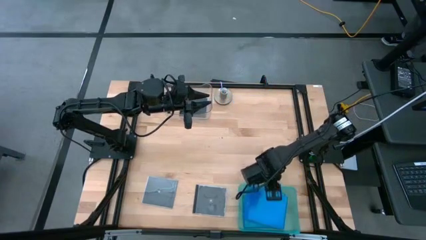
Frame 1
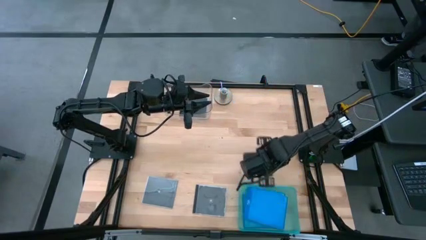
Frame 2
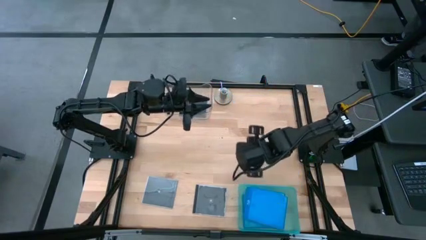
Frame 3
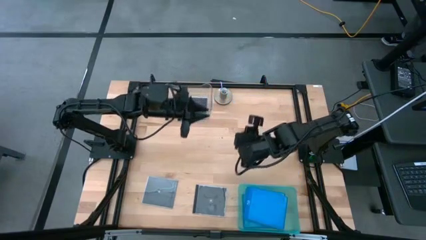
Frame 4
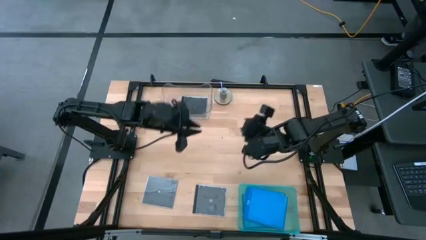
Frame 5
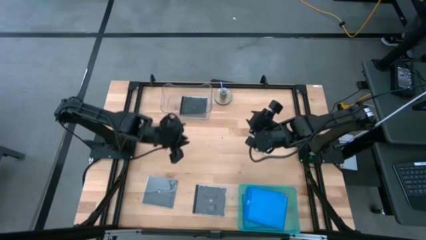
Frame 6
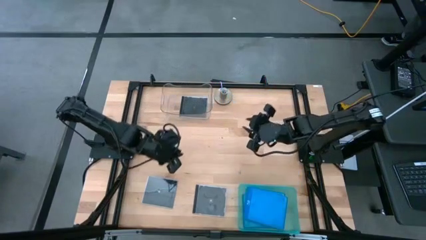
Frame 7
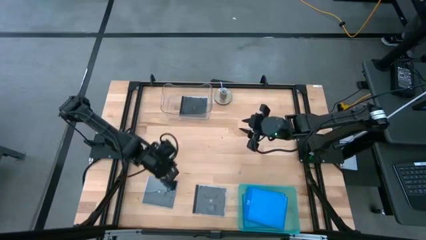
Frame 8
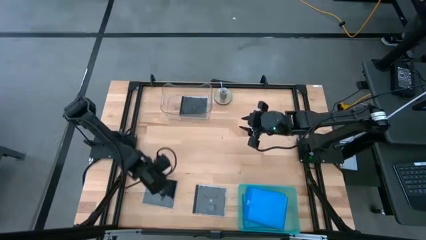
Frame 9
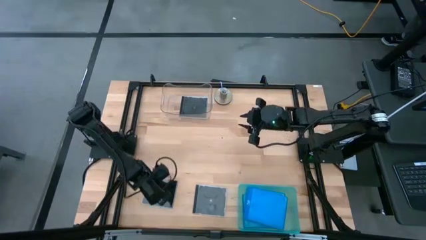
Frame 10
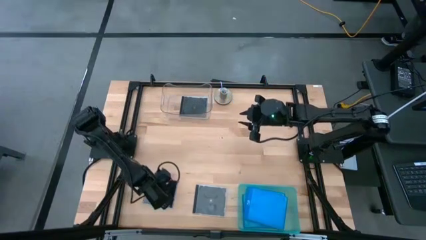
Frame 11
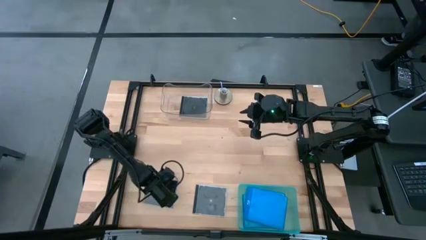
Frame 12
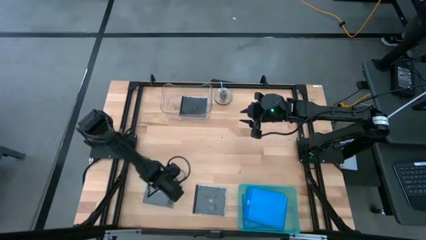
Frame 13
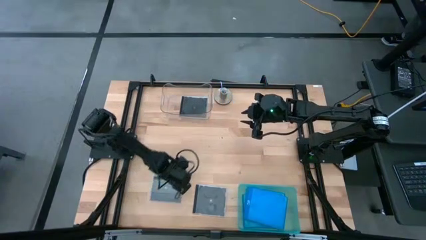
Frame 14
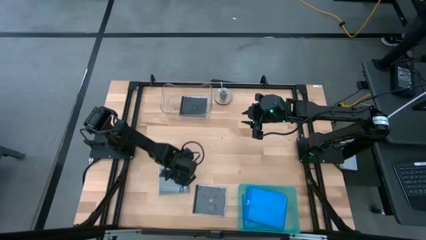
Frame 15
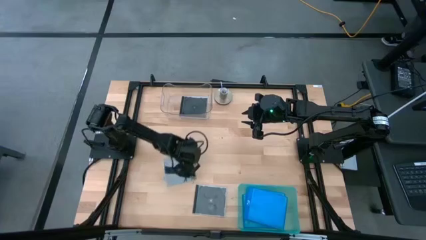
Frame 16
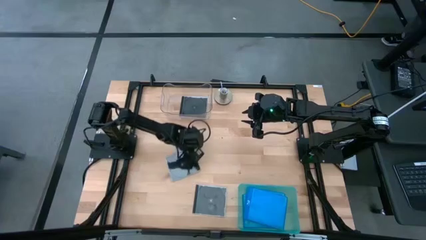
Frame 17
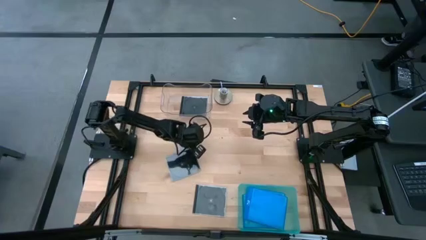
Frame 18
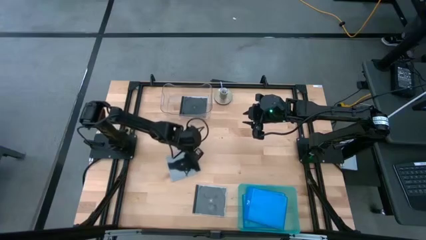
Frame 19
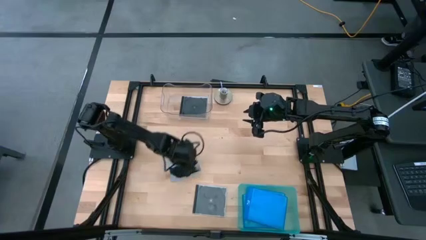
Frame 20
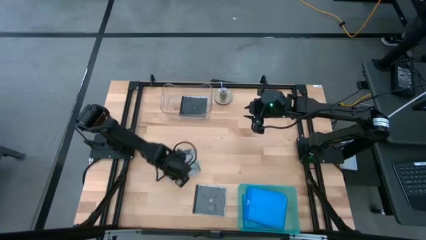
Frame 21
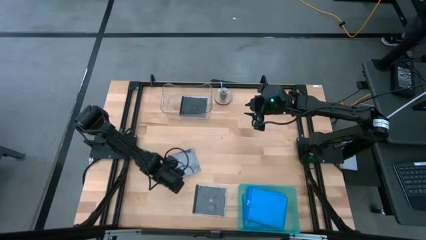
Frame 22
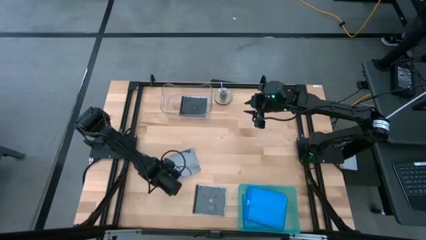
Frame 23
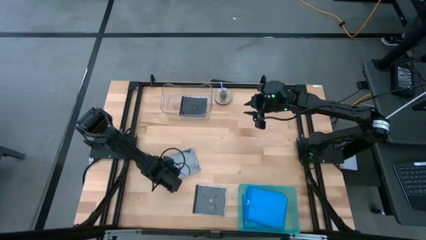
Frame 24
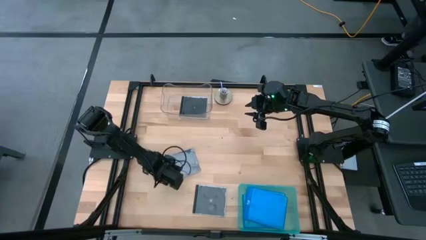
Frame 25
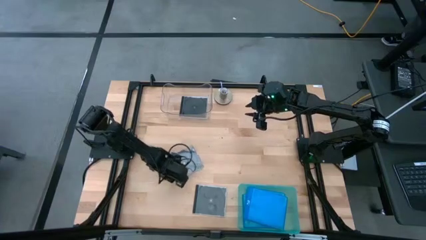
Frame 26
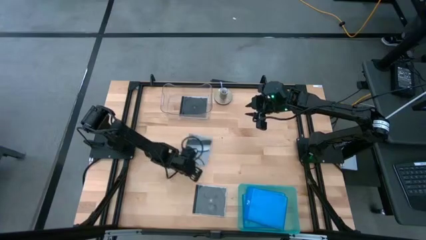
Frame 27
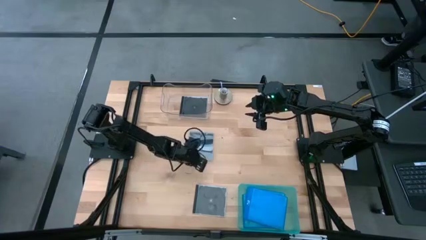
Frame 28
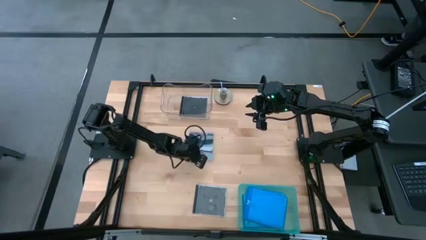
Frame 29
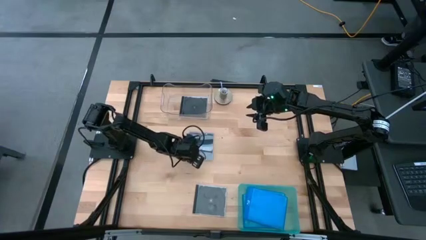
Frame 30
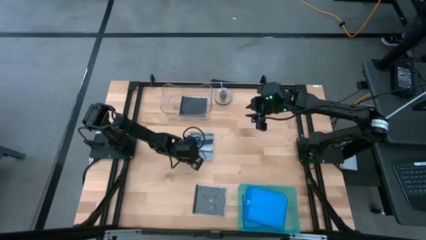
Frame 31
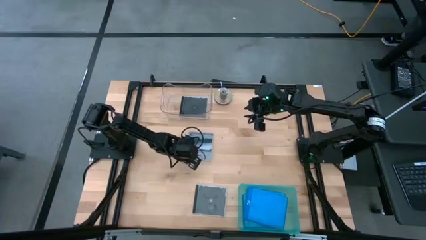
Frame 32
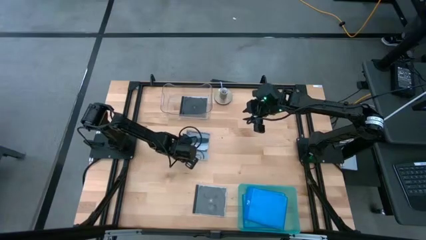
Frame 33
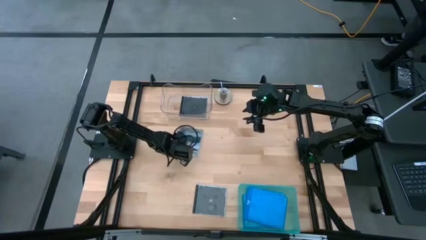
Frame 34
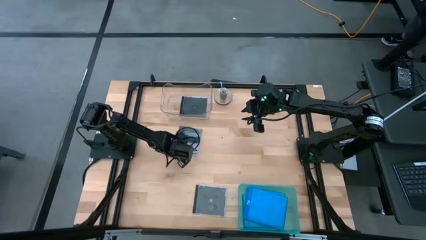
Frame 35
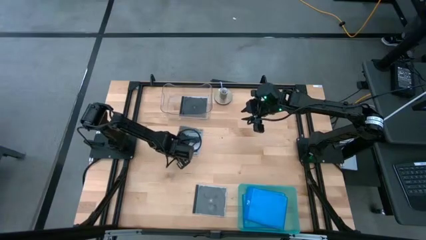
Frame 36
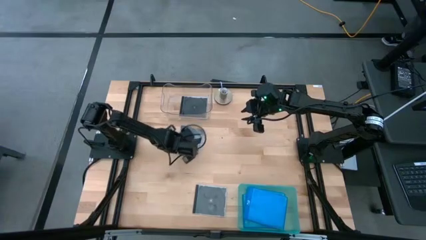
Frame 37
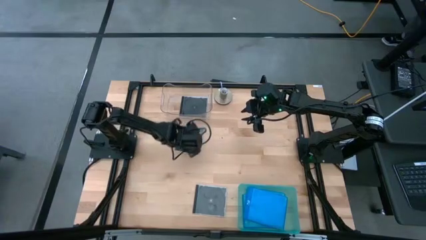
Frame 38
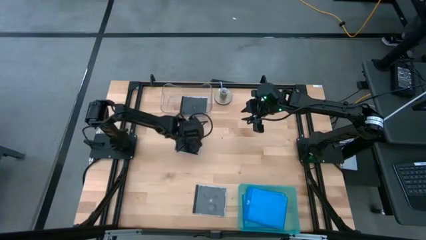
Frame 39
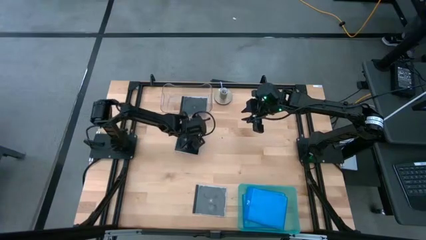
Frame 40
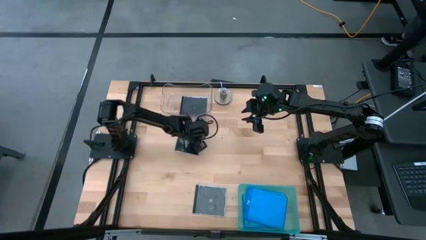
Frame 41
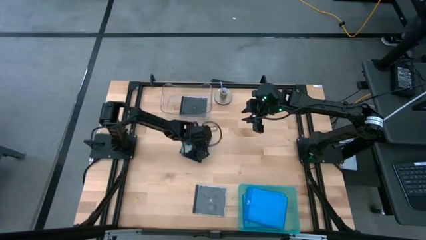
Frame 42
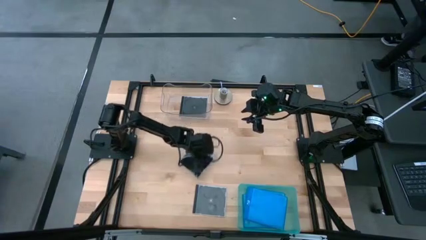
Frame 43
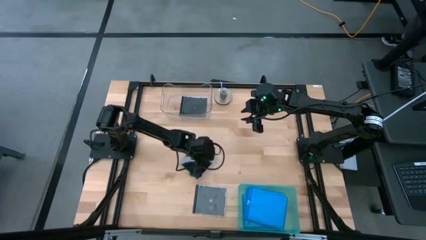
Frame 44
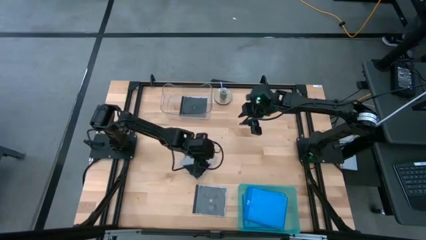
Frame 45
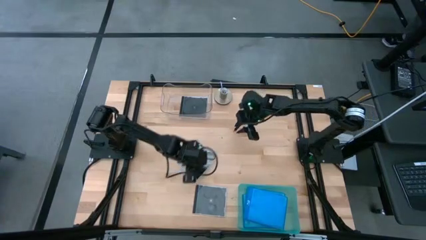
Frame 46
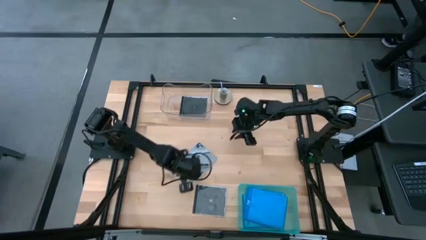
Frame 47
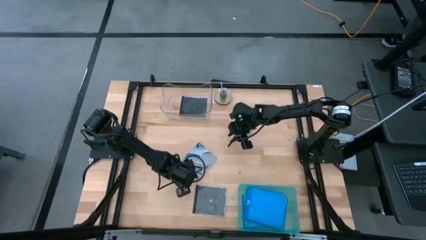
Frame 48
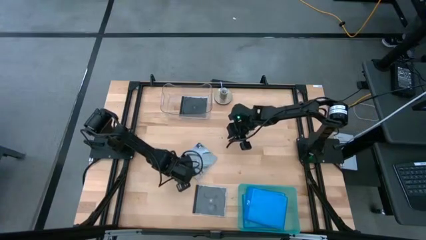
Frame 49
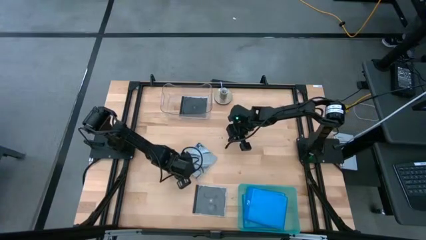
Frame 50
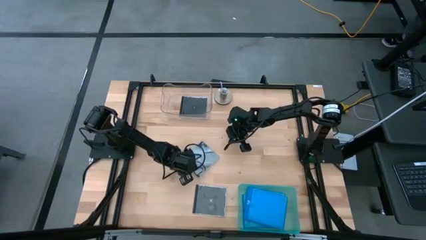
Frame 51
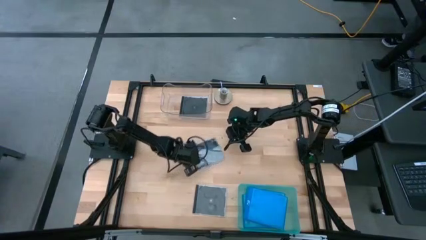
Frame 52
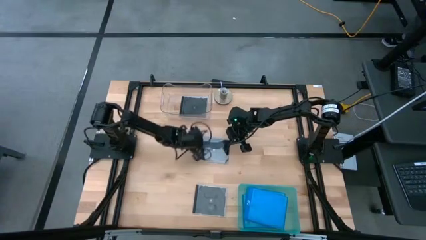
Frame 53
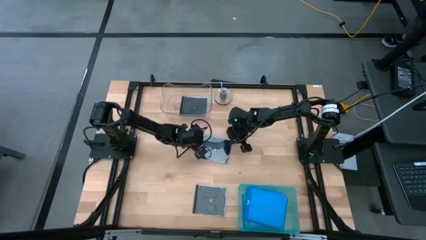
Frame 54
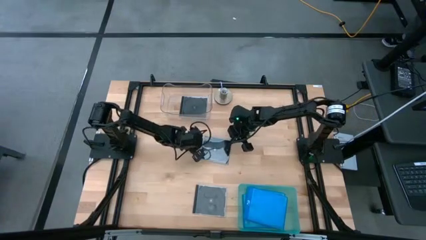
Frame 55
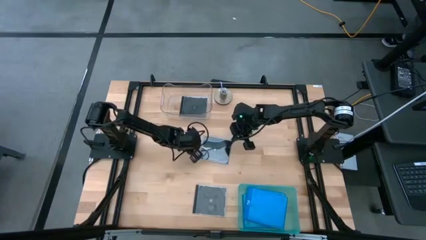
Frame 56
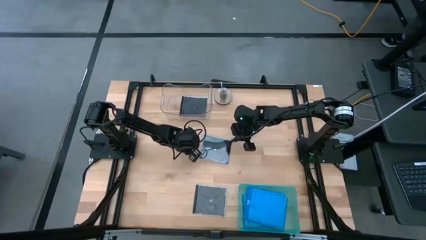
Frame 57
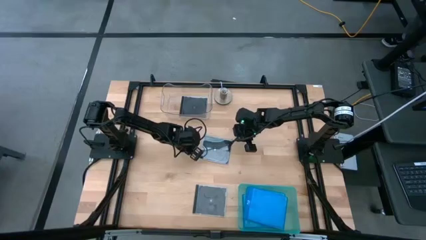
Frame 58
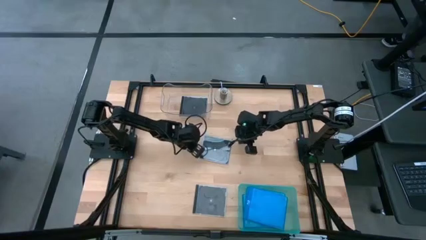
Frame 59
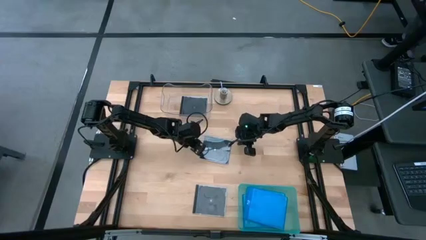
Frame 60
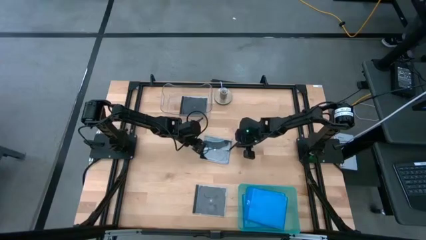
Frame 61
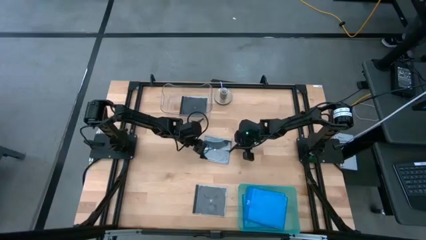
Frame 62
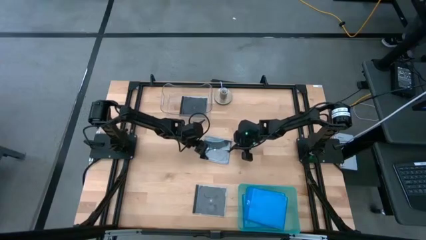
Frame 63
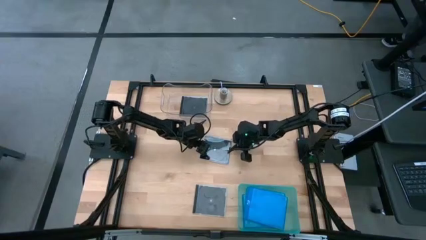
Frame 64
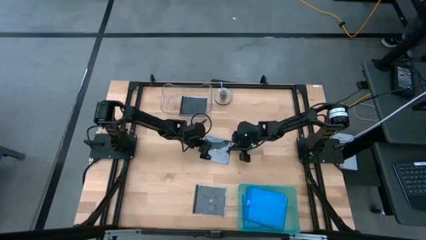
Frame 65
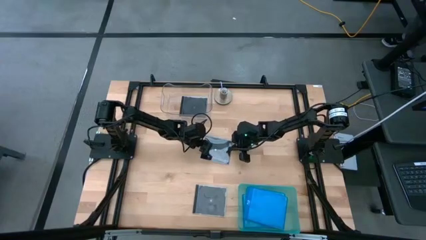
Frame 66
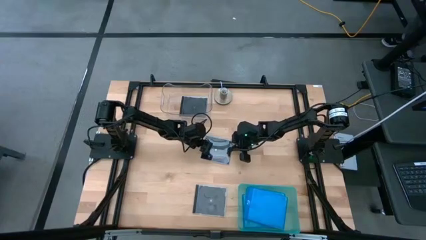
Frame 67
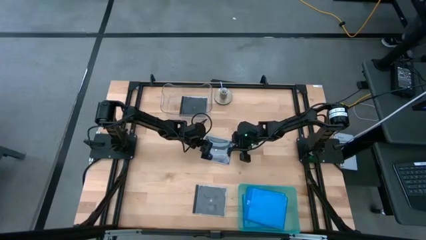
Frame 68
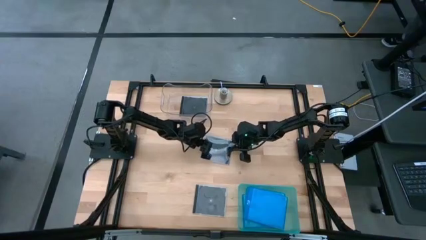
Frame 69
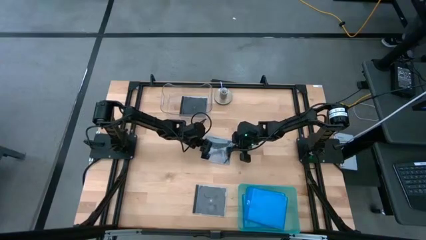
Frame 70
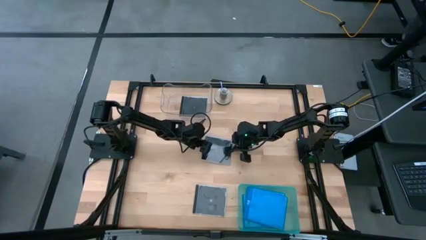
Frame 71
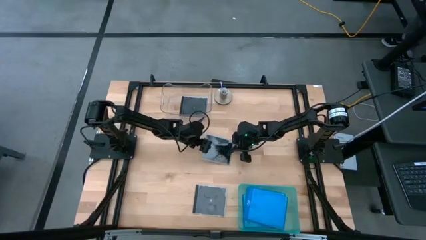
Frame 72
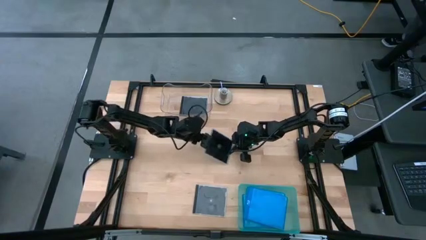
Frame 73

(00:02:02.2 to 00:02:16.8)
Task: Pick & place jewel cases by type
Put the left black cd case into the transparent bin

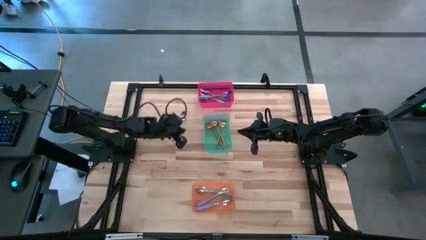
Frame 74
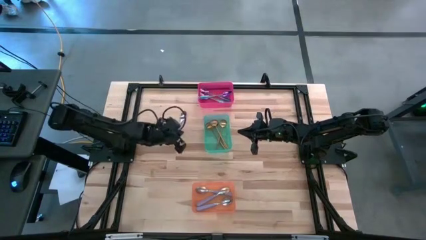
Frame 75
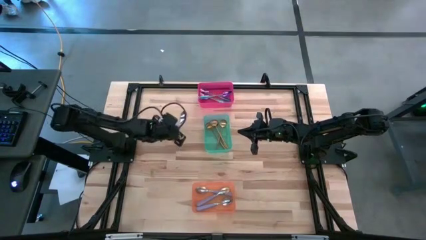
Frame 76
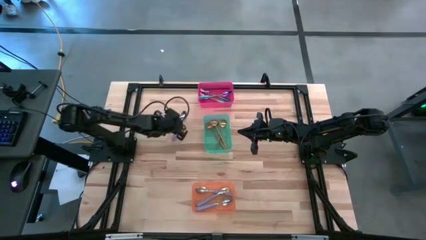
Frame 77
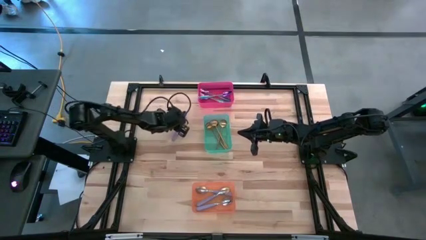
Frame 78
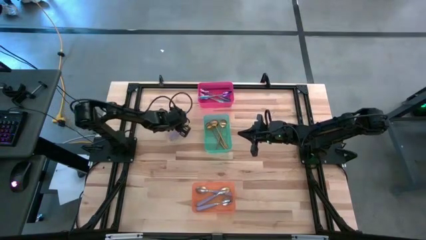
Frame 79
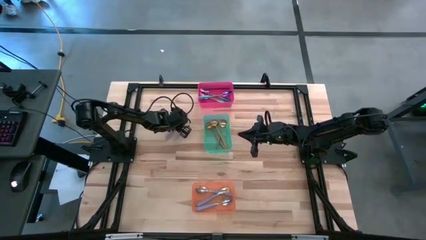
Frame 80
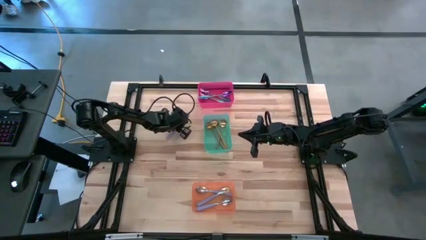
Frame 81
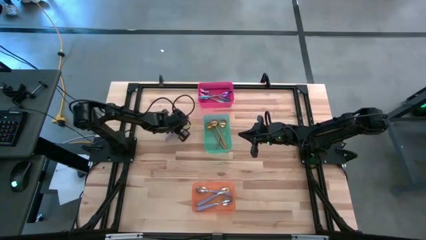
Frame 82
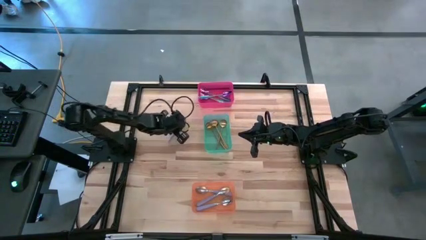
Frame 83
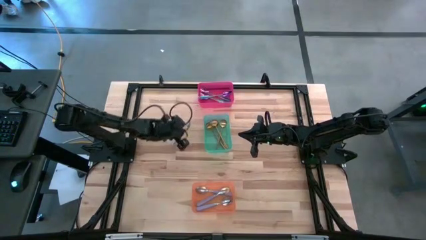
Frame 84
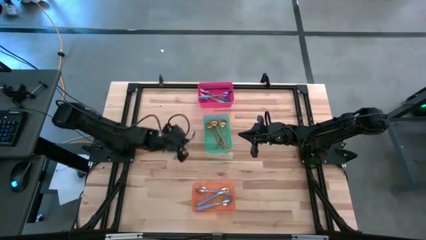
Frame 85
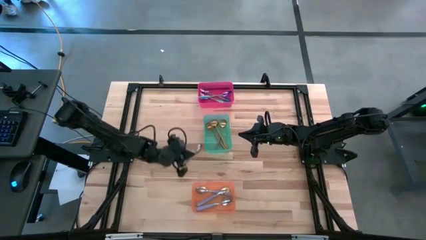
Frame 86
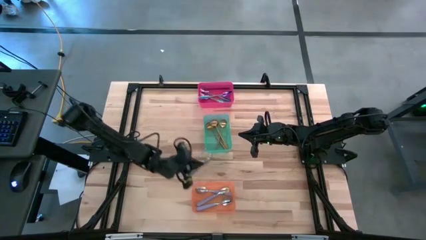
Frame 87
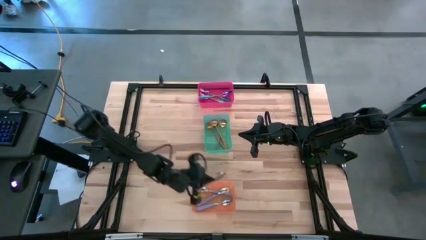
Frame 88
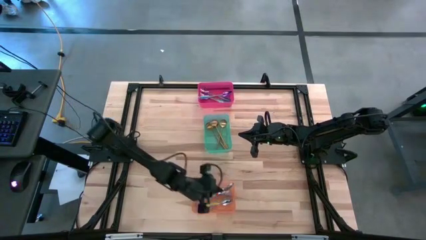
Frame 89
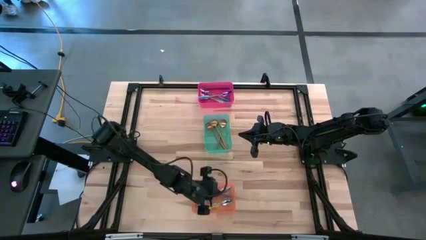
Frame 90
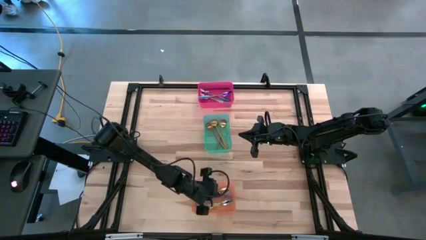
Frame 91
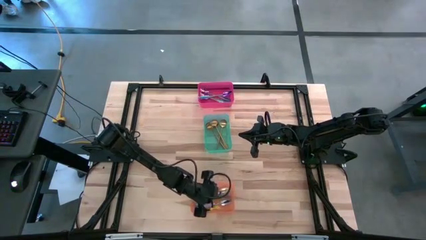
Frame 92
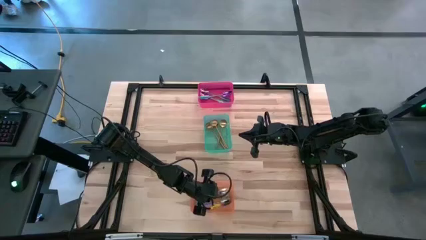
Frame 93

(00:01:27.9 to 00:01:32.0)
Task: Sort silverware by color (type)
Put the purple spoon into the orange bin
